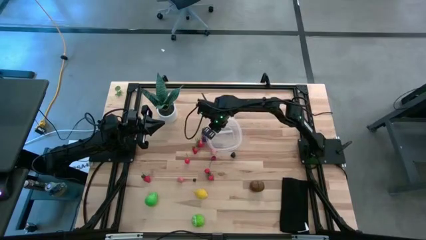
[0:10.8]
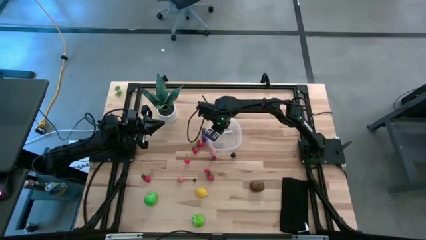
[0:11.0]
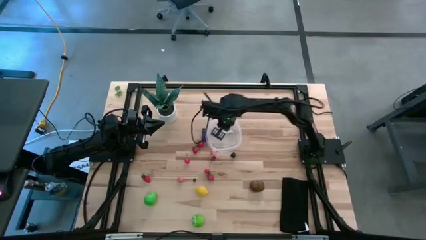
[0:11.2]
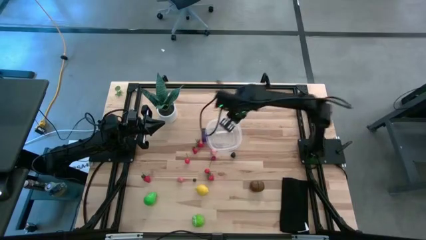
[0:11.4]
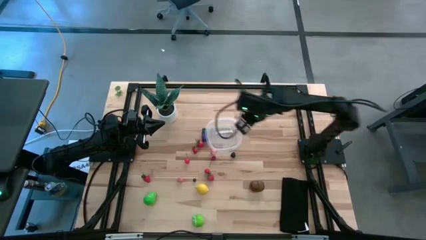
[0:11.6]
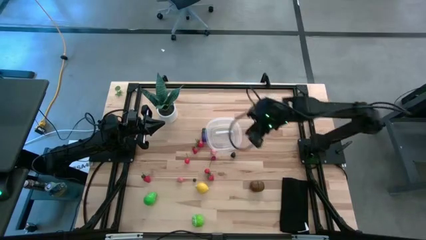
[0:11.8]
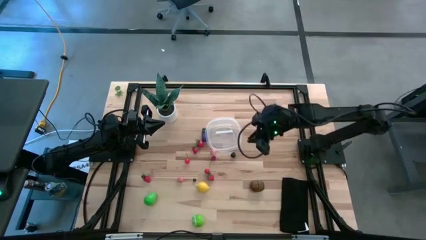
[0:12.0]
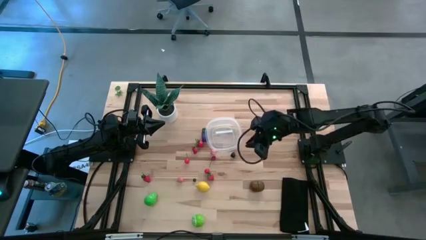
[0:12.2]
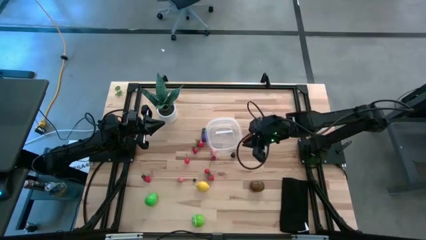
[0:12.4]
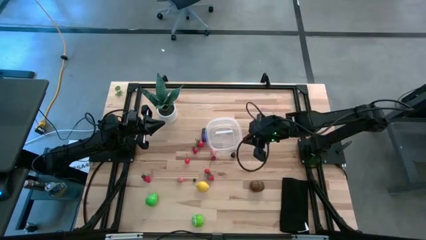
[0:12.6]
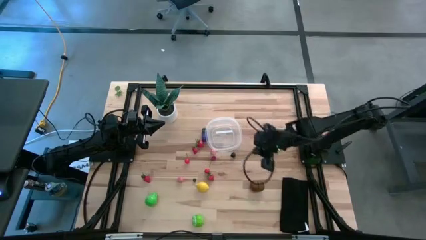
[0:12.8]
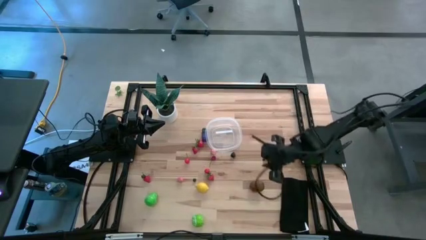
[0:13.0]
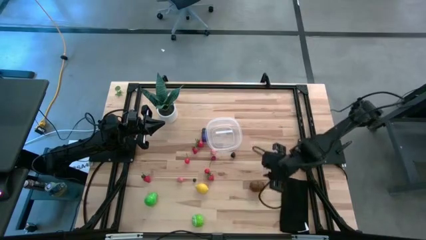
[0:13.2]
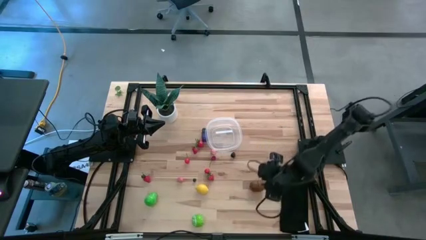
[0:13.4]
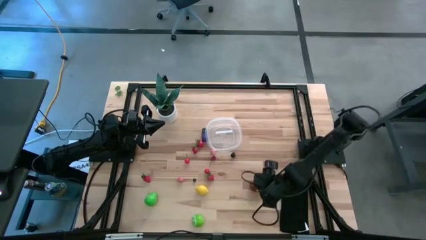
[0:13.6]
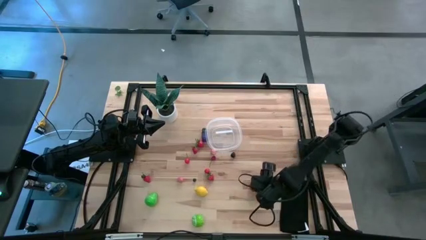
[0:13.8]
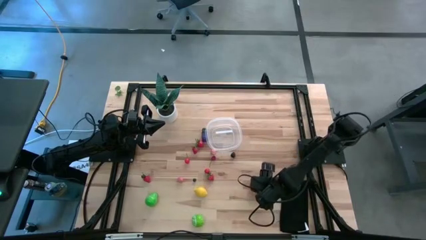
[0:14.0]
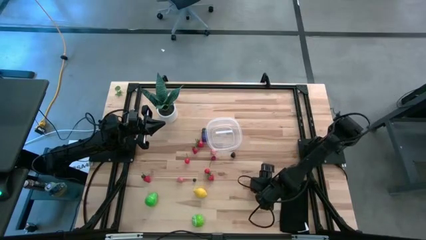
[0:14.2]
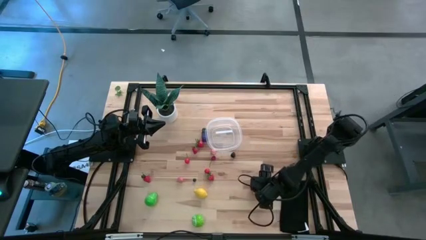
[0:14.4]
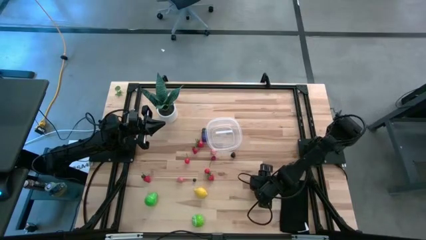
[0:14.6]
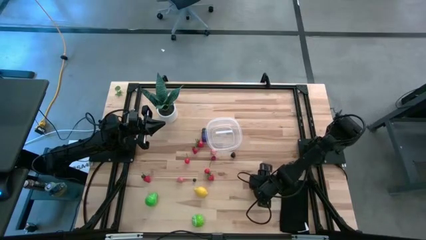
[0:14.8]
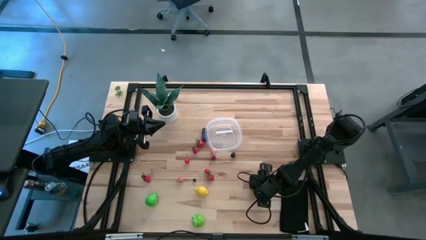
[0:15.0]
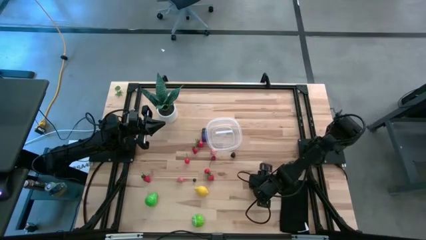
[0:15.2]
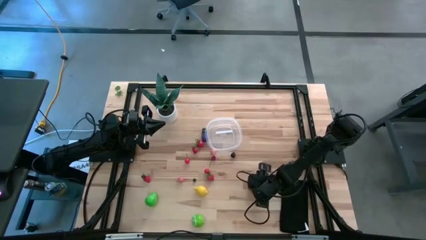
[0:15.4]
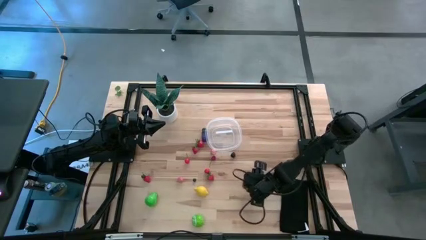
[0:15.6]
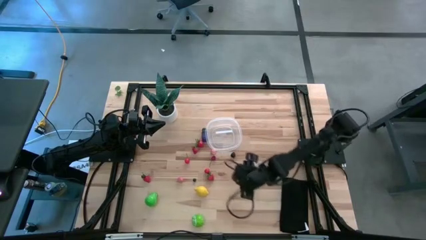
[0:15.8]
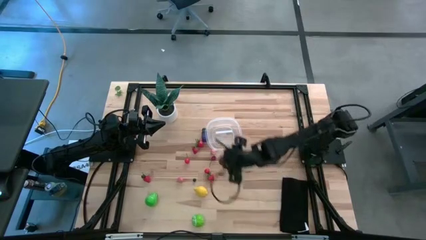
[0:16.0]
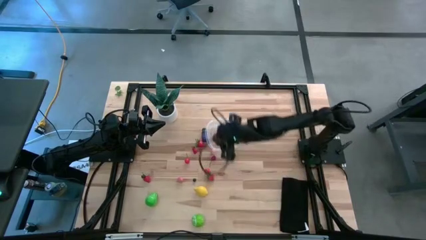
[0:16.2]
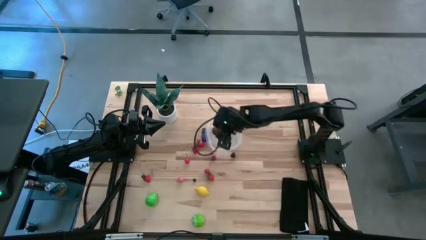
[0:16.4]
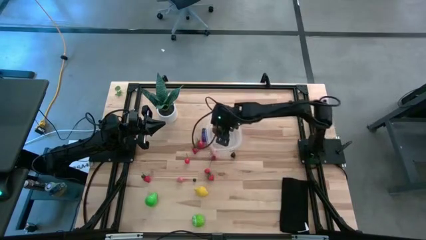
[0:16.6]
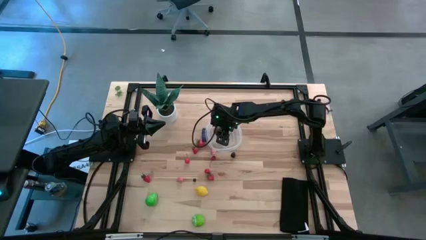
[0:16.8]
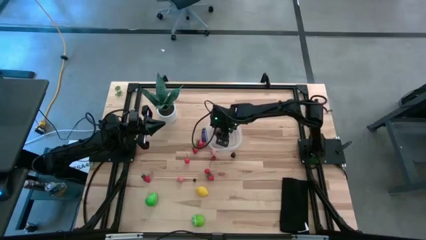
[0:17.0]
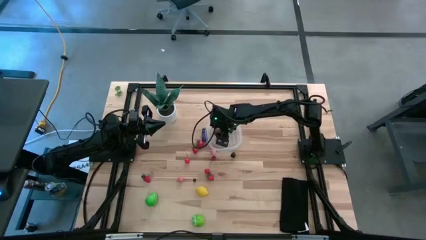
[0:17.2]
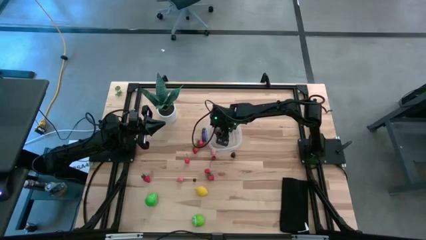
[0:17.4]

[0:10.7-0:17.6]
Task: Pick and placing Produce into tupperware
Put the kiwi into the transparent bin

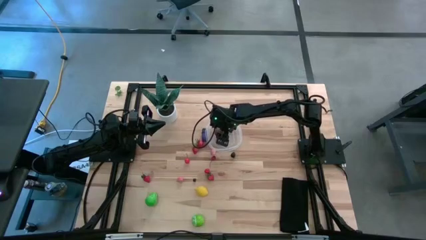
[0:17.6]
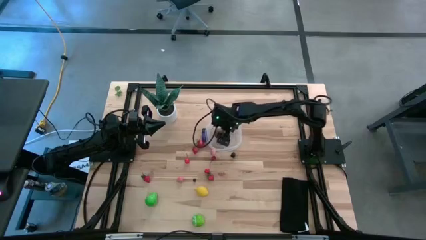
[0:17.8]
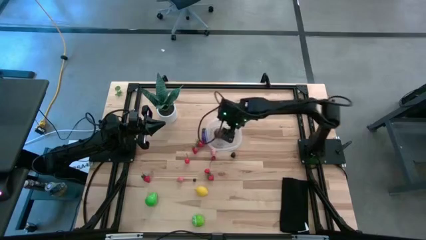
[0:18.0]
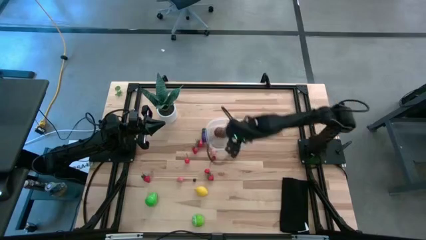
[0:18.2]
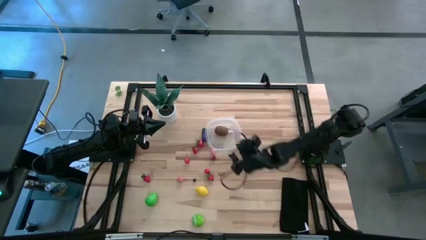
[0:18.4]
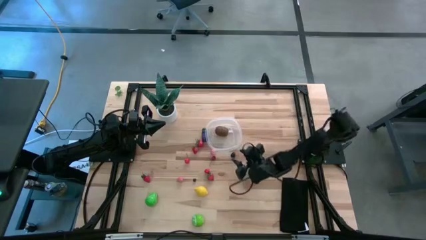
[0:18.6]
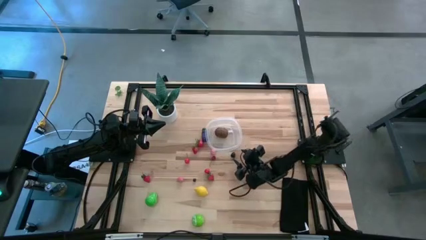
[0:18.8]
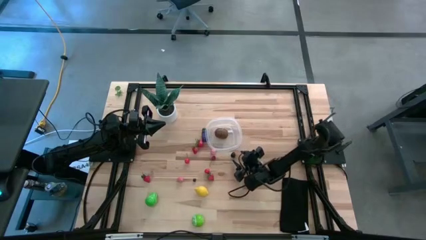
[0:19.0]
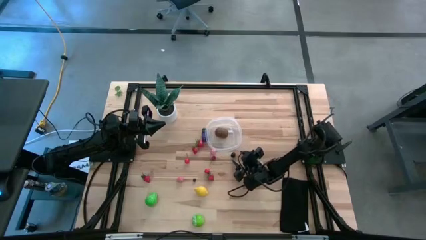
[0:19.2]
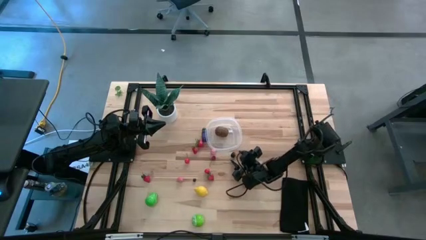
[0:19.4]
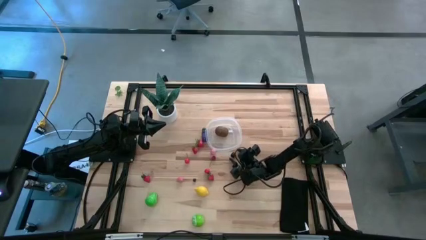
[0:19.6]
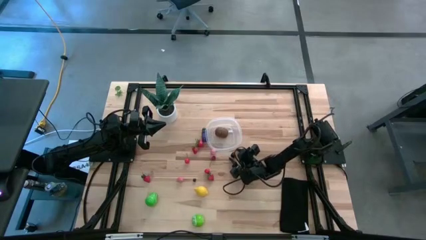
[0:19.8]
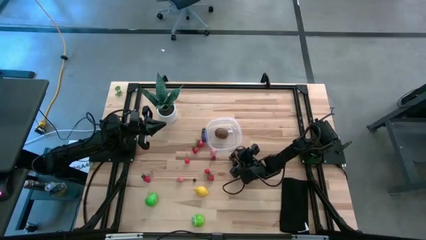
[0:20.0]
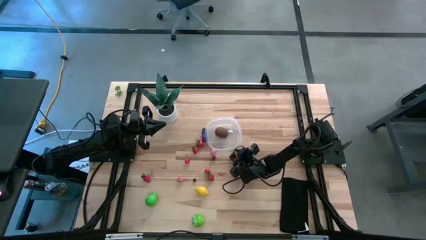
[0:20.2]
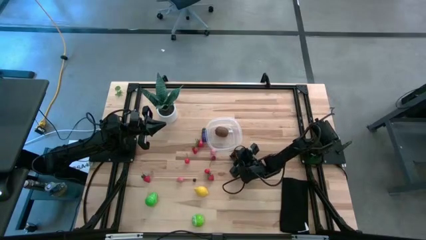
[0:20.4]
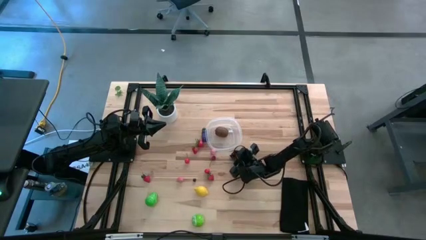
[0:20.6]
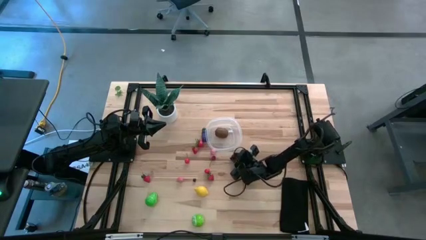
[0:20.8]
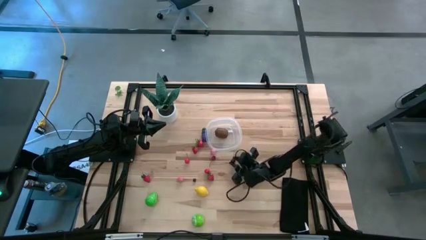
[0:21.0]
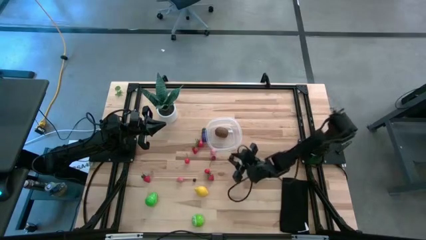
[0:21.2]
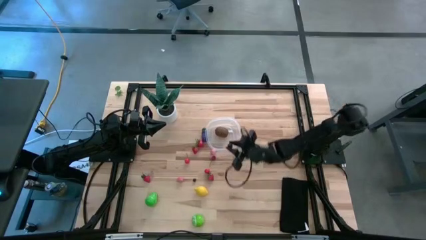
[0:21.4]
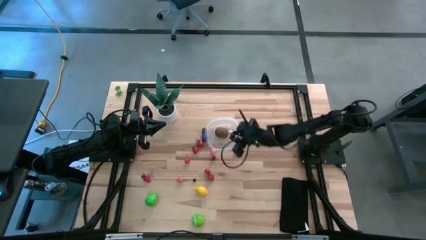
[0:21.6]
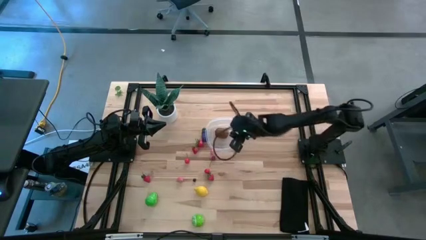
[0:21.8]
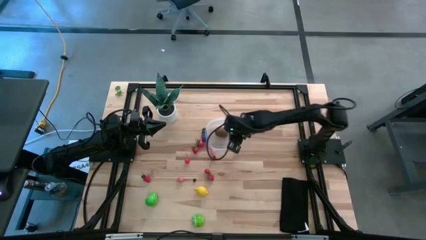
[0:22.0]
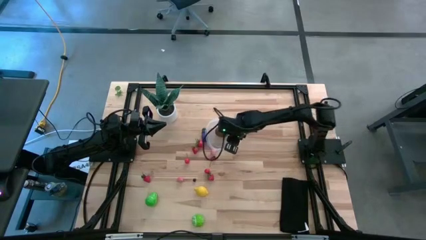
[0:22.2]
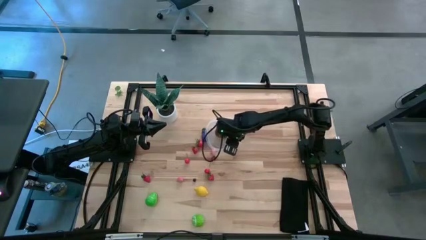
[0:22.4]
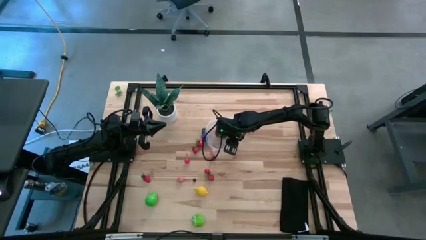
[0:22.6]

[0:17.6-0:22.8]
Put the blackberry into the transparent bin

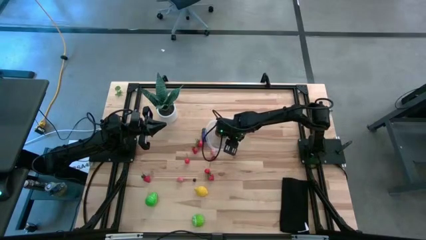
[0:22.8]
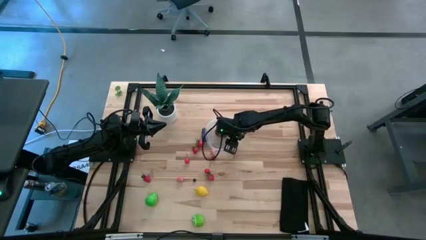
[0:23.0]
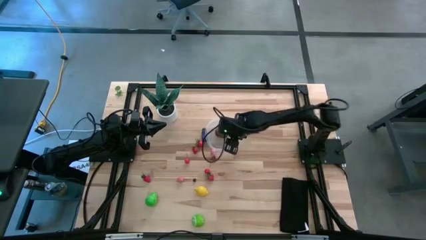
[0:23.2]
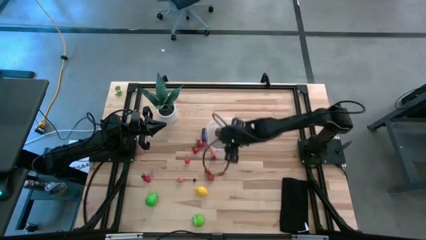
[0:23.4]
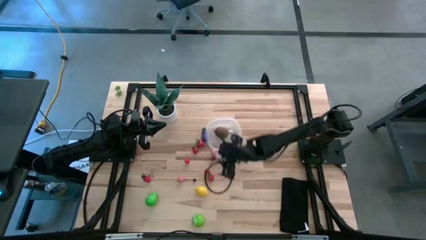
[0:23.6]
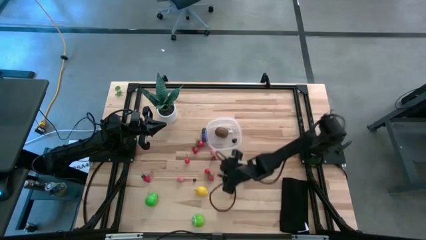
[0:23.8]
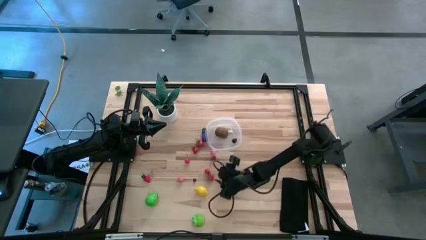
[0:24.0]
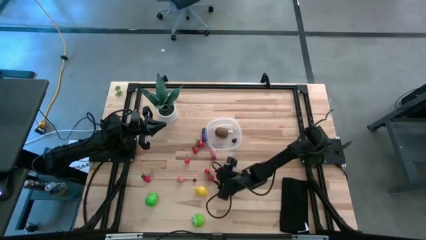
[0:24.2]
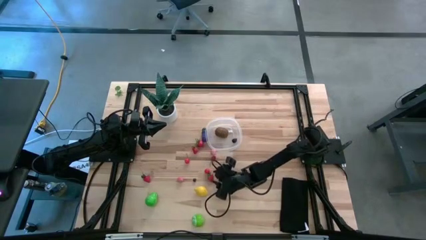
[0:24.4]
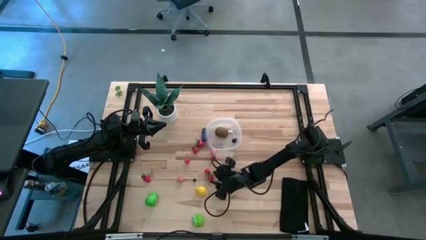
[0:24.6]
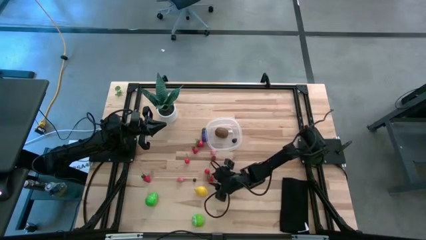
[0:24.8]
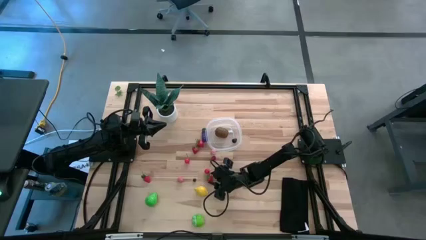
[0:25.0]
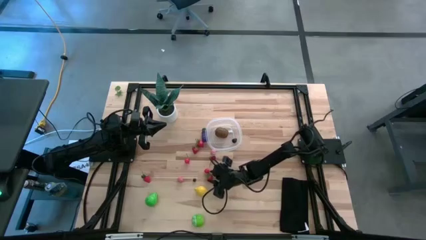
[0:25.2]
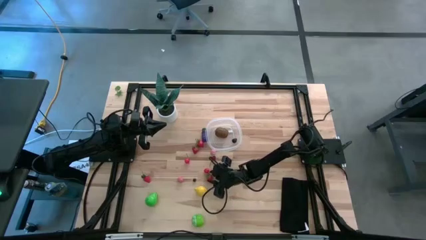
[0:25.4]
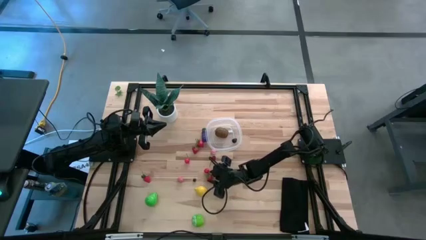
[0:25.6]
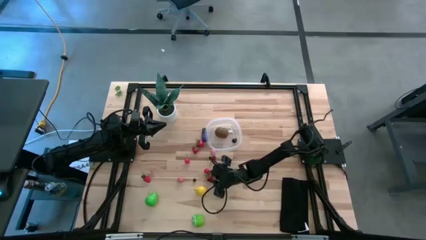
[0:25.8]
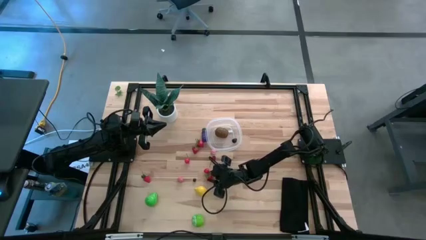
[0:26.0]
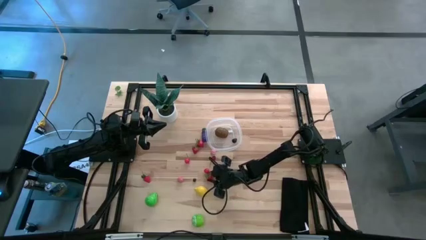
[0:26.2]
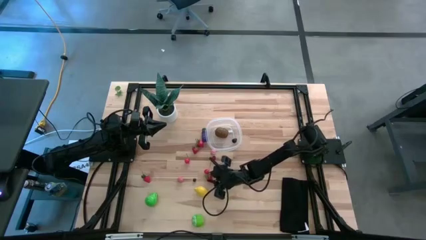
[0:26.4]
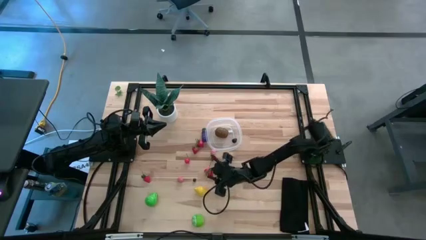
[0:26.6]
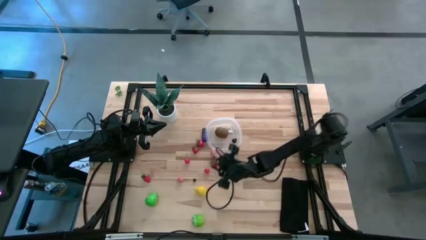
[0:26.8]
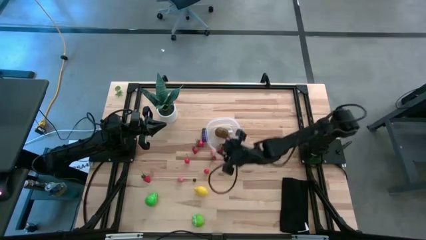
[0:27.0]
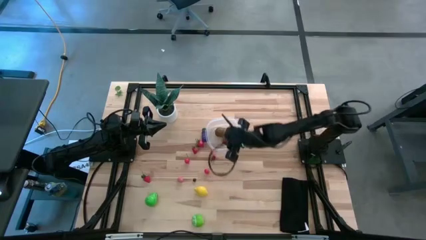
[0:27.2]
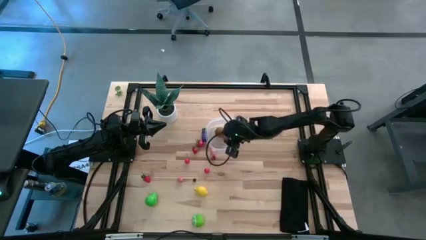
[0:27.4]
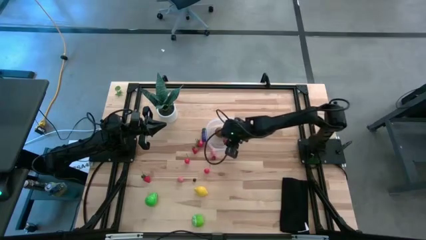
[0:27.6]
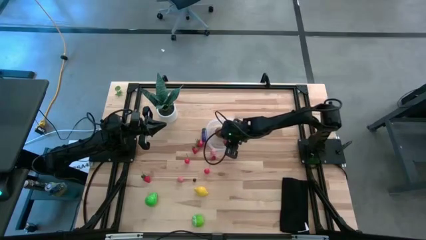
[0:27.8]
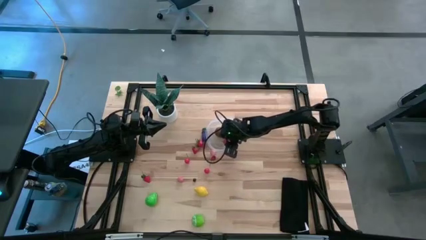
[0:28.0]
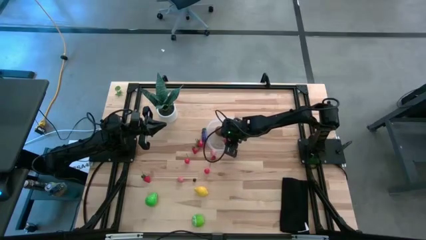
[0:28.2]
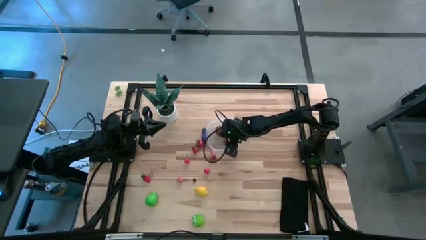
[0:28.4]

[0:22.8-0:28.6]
Put the bottom right strawberry into the transparent bin
